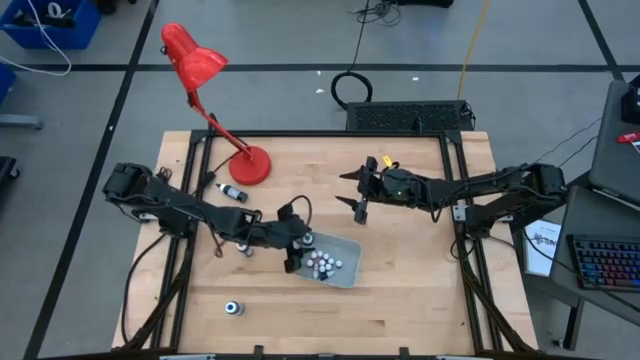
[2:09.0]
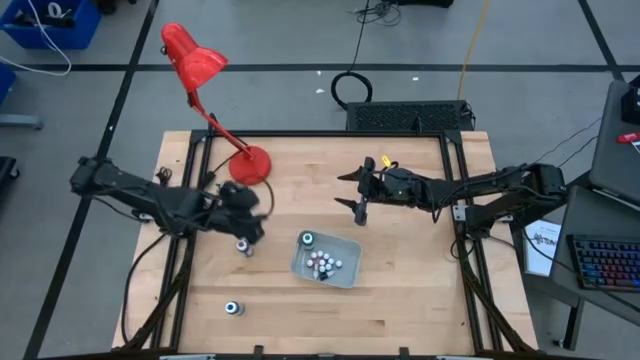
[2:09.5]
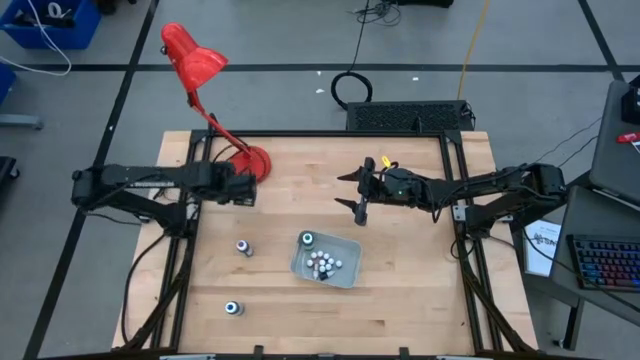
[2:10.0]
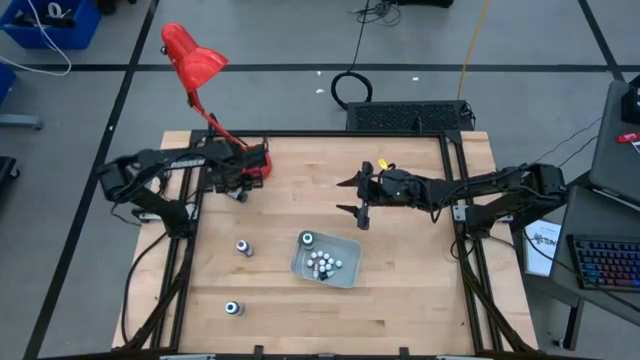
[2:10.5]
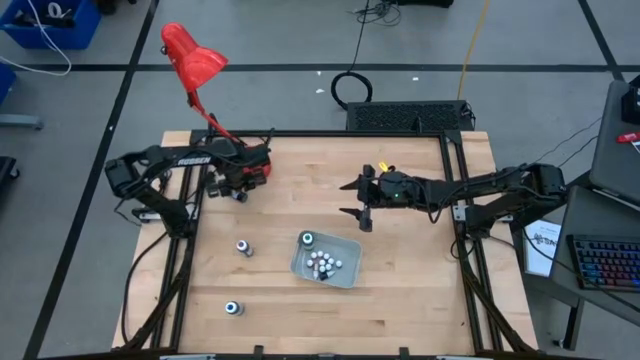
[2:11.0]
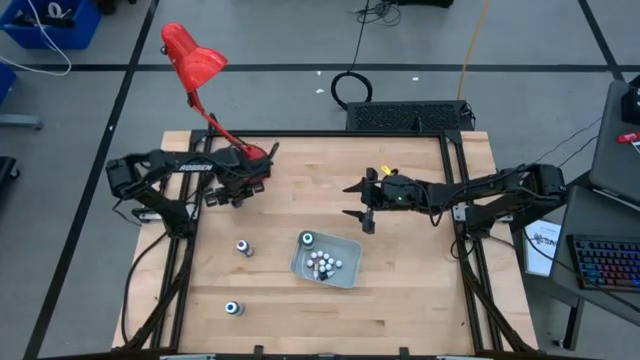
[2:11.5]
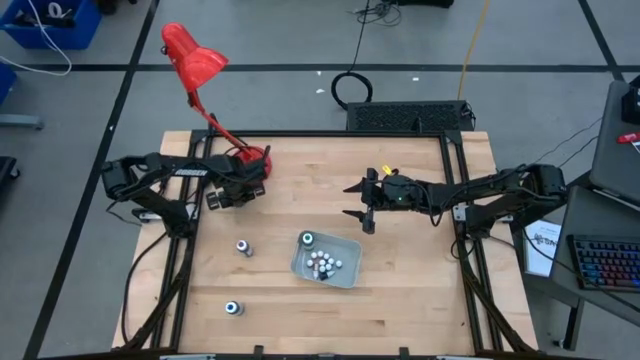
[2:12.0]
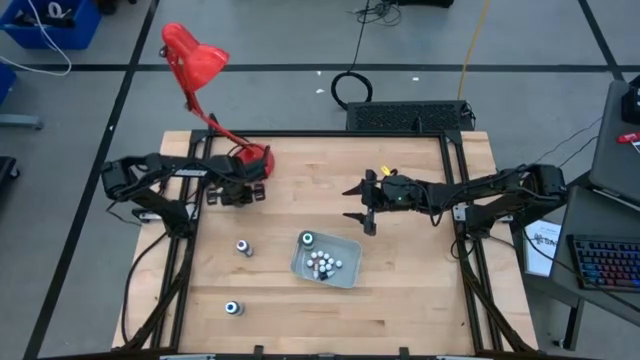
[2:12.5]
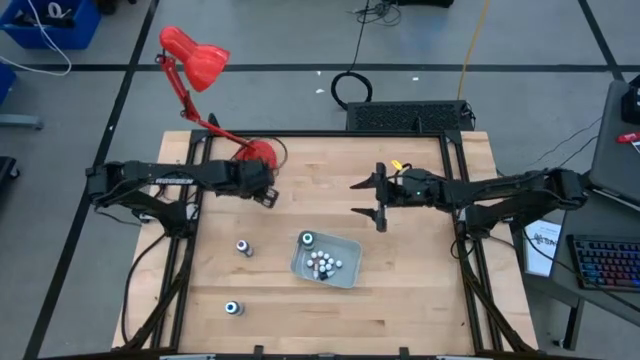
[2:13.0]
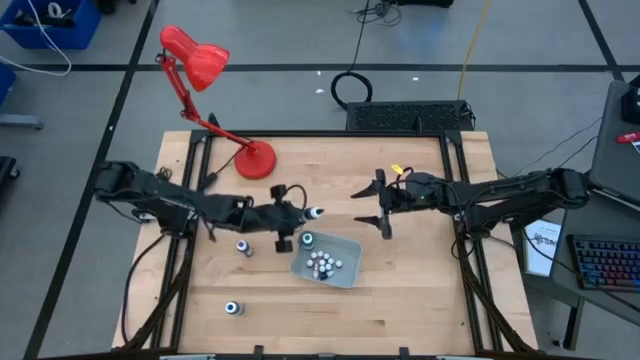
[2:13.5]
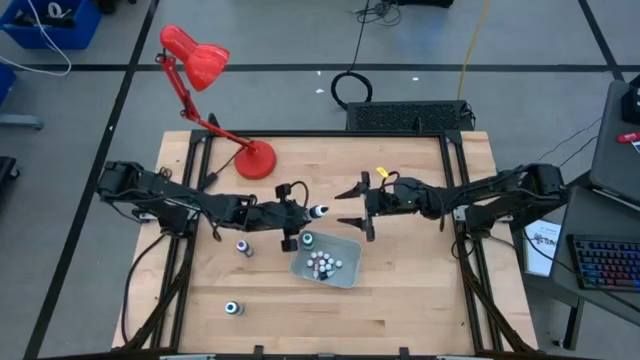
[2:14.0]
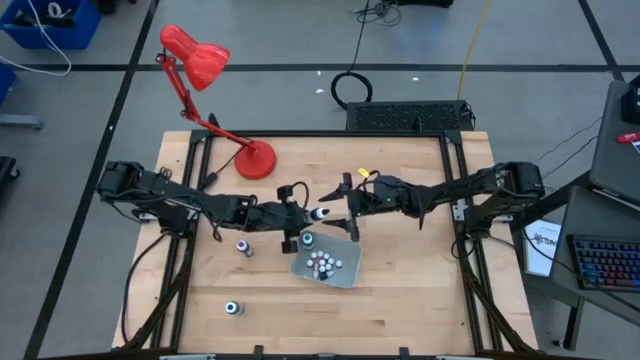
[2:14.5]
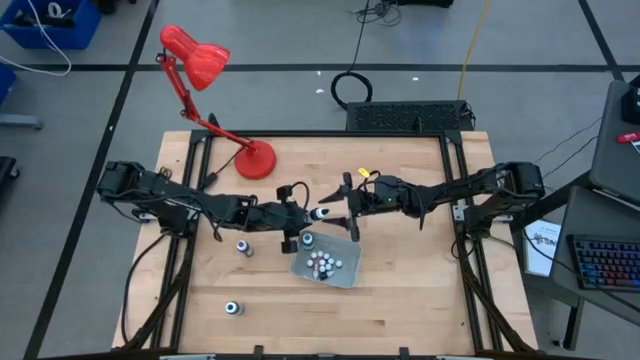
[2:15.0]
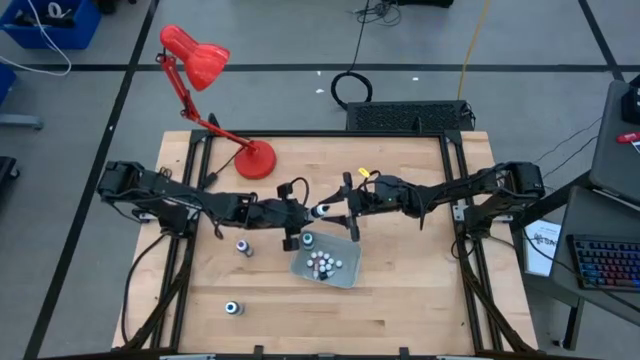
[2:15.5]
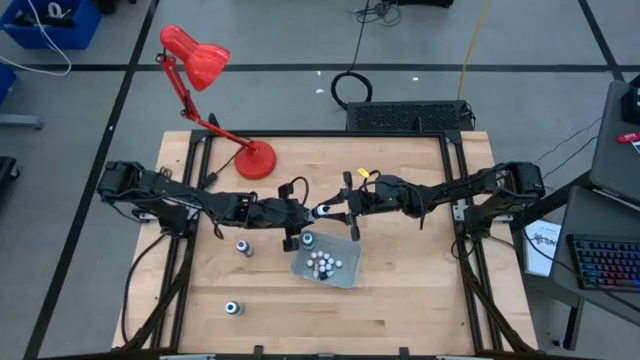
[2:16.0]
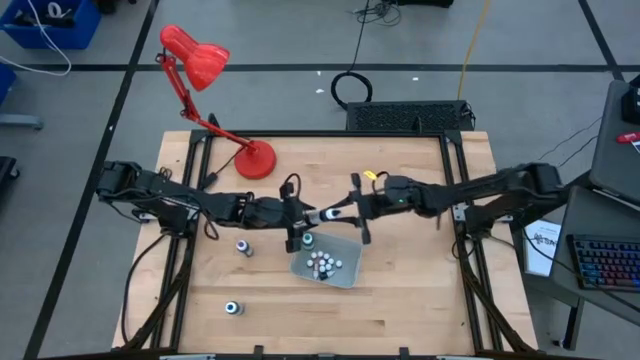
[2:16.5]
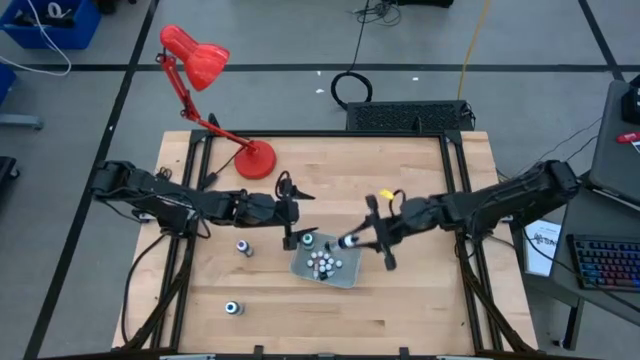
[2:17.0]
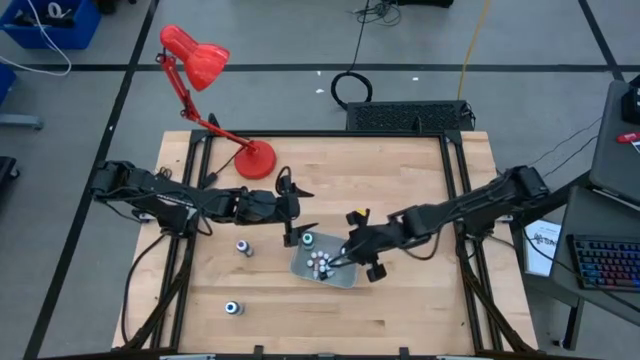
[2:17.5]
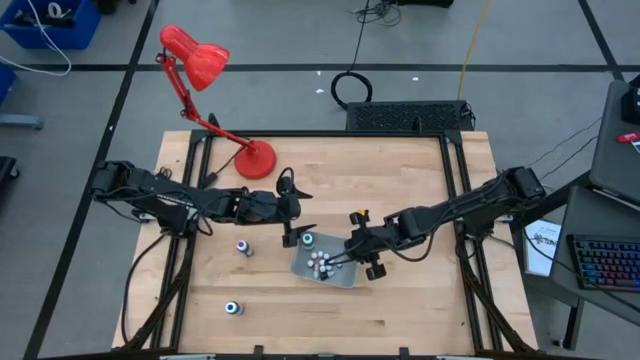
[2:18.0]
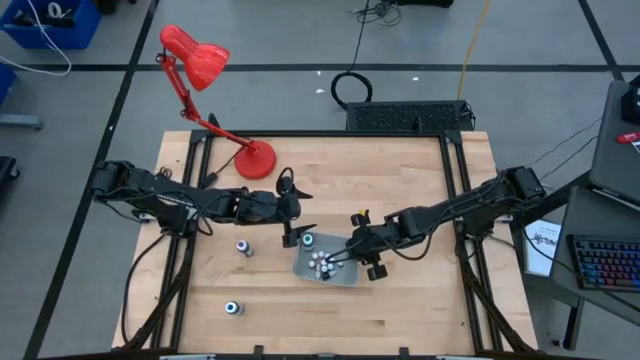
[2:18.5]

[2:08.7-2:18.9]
Task: Pick & Place food coloring
Put the large black food coloring bottle into the gray bin

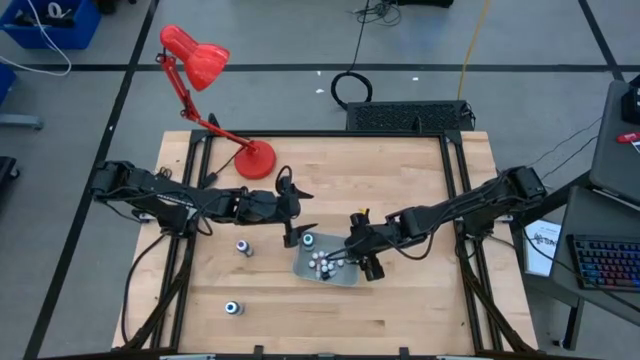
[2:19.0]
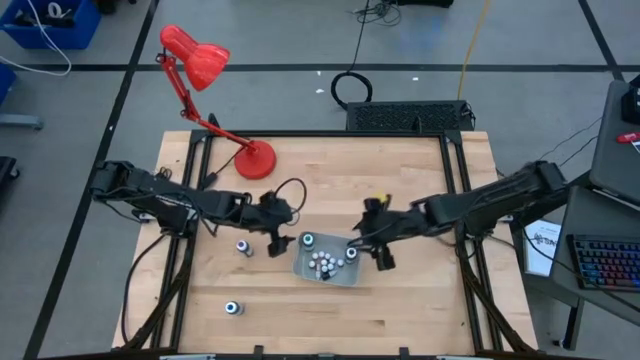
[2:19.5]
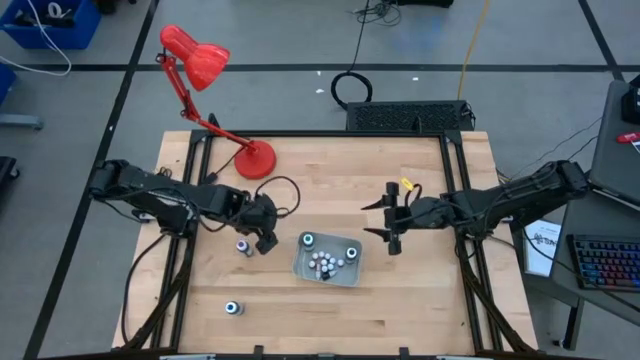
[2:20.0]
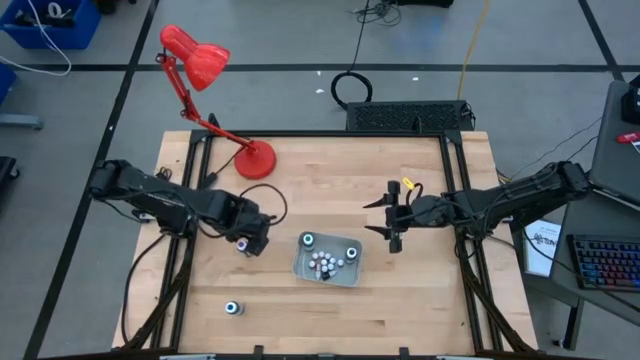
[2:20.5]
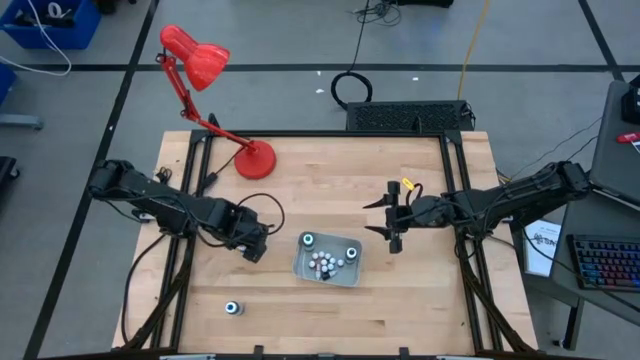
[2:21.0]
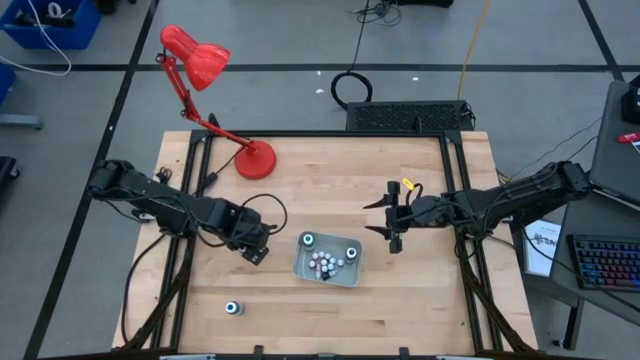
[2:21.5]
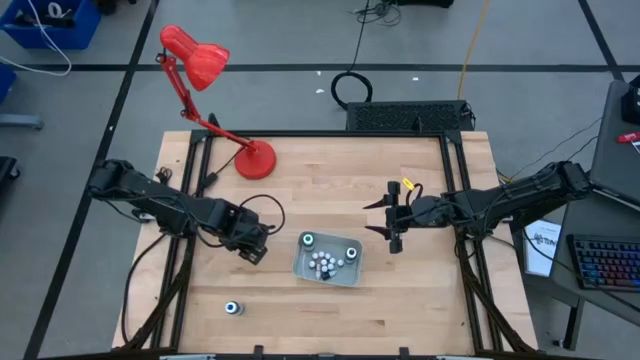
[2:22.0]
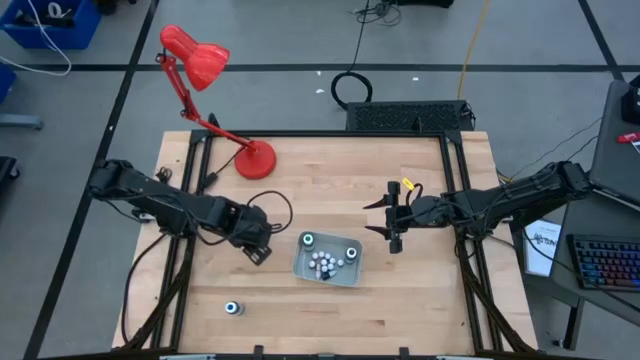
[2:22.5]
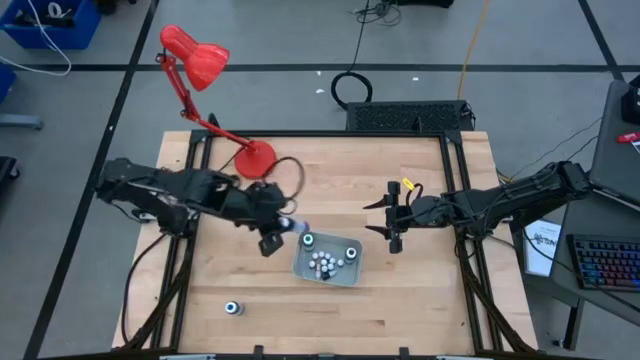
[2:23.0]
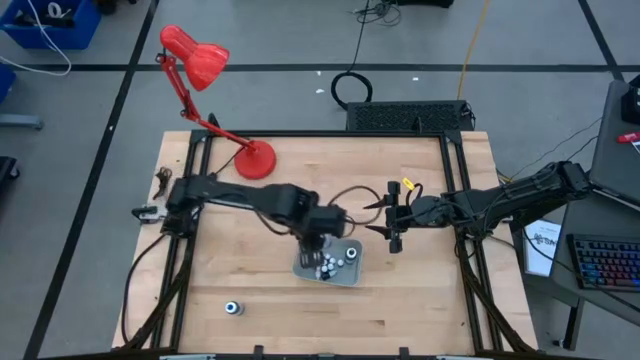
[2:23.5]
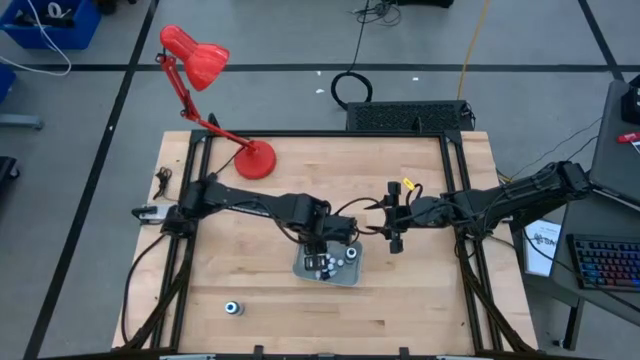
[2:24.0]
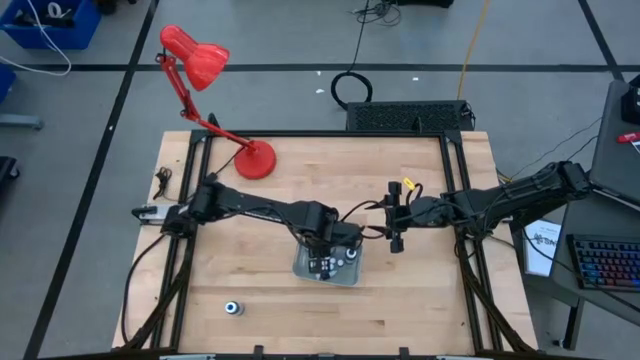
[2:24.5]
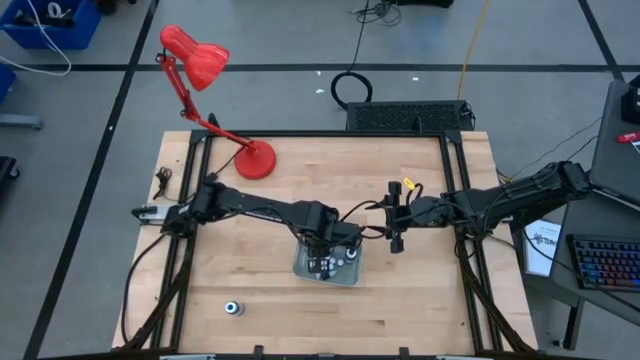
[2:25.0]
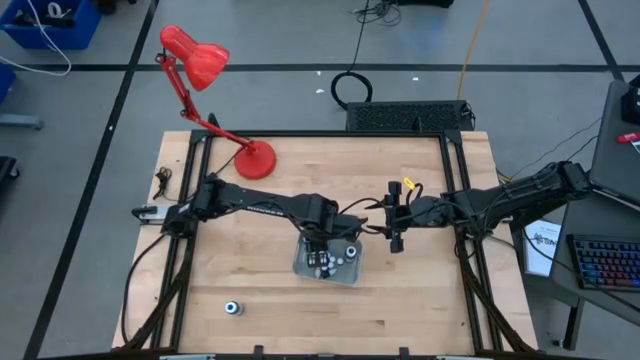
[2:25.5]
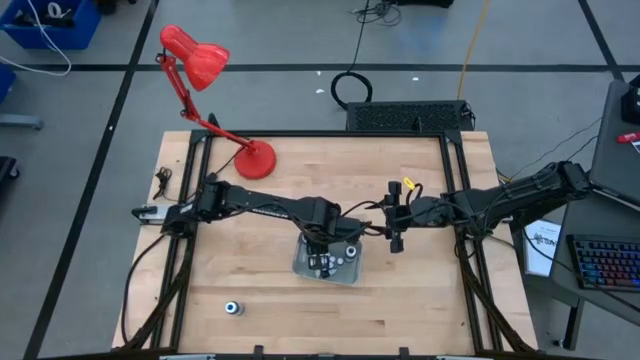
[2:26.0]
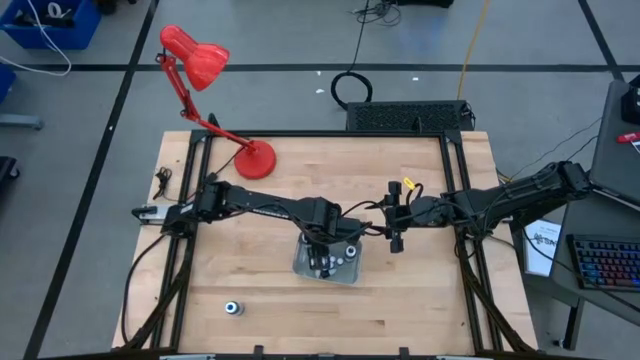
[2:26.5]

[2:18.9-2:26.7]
Put the large purple food coloring bottle into the gray bin

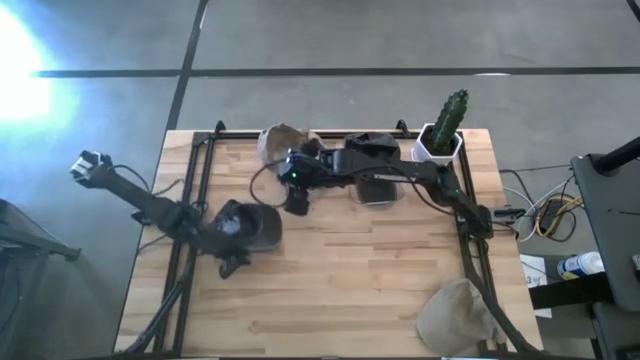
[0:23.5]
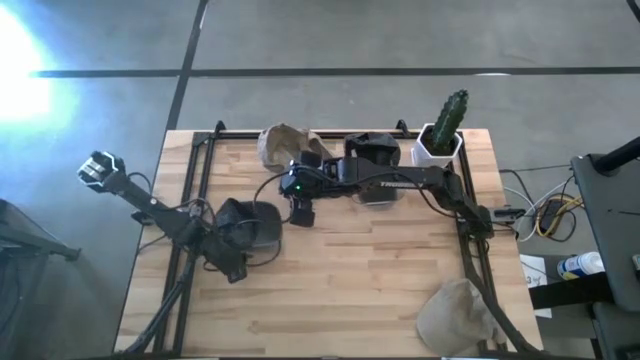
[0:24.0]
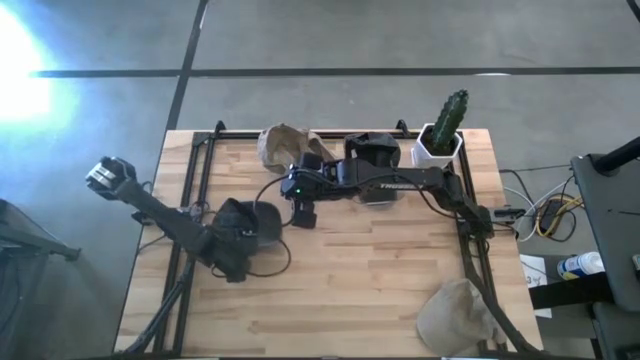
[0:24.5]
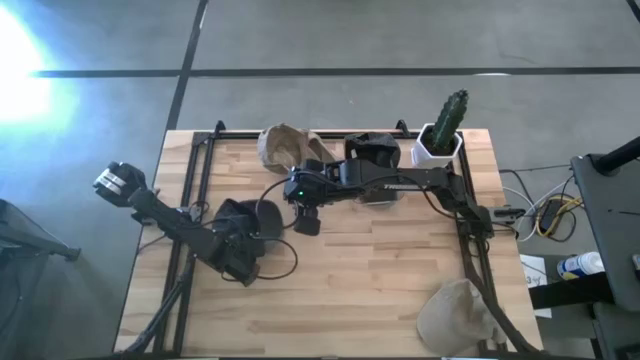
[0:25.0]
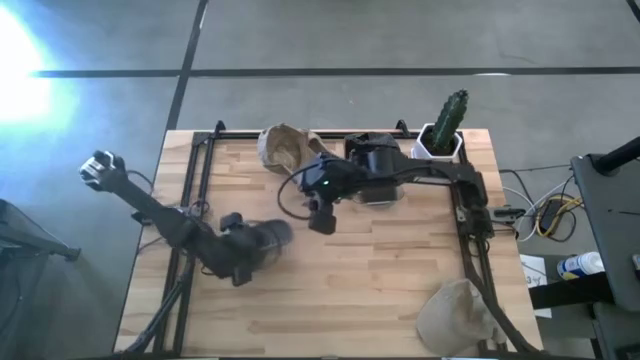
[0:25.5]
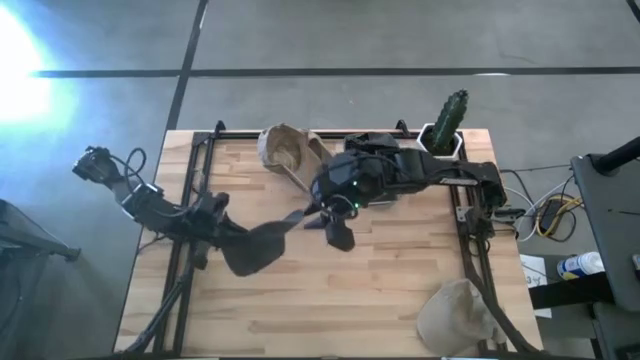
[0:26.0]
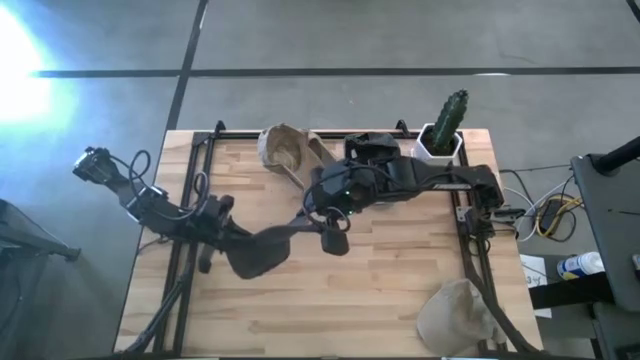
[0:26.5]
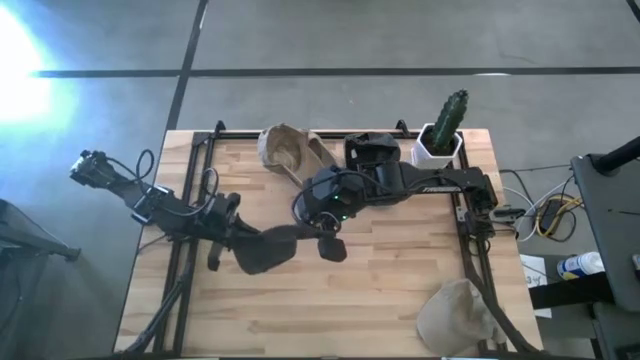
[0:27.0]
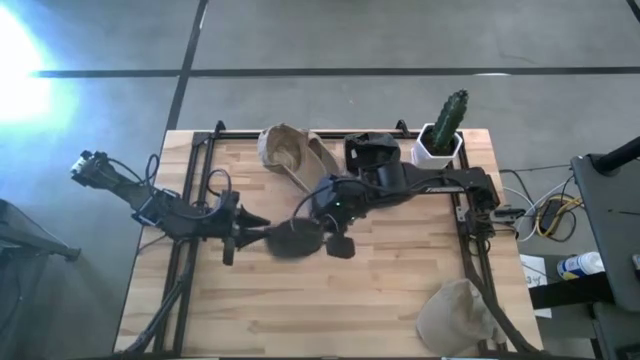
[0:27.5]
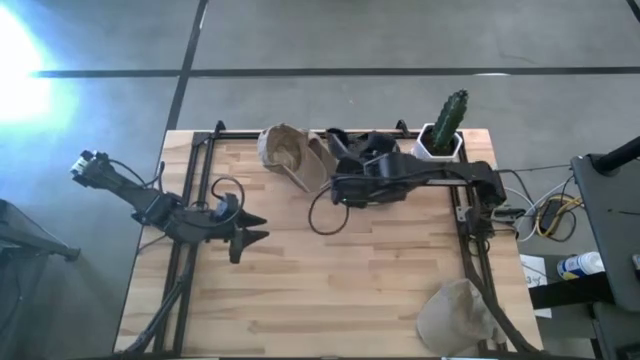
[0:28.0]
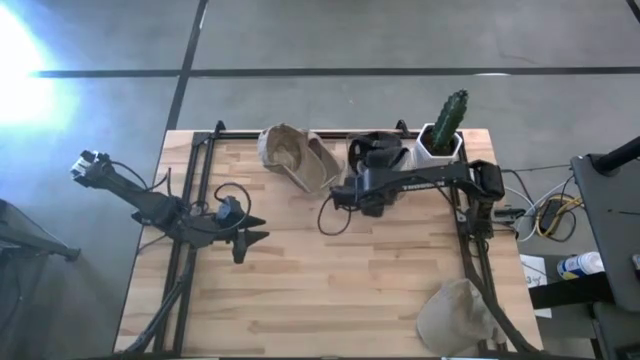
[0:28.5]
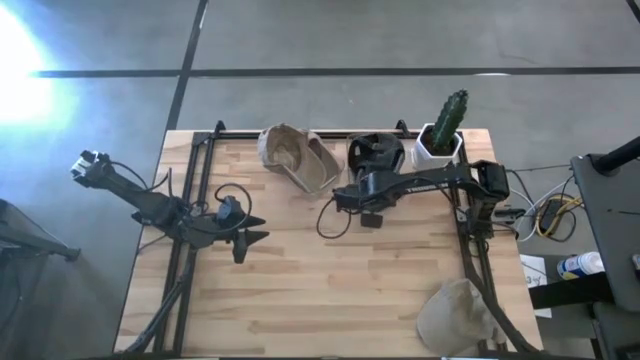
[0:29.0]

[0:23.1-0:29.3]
Task: Pick & Place hat
Put the black cap into the right transparent bin
